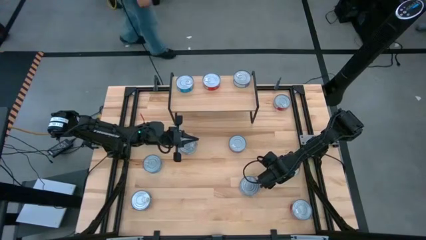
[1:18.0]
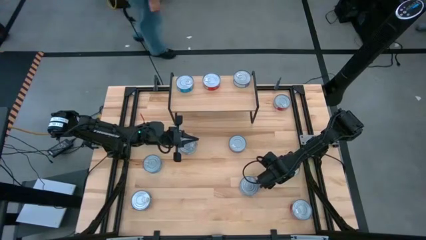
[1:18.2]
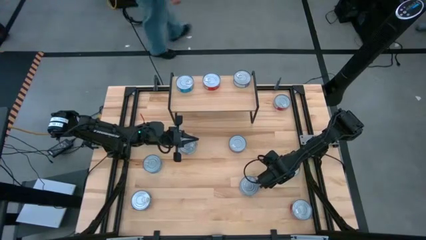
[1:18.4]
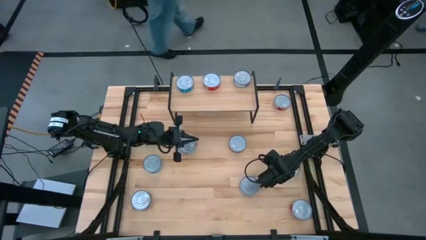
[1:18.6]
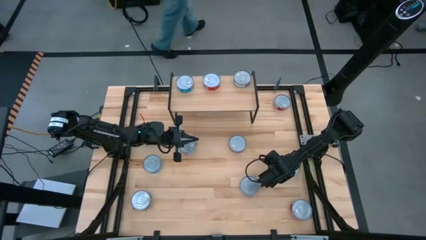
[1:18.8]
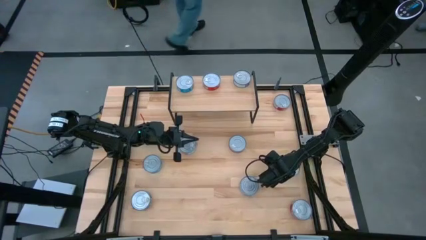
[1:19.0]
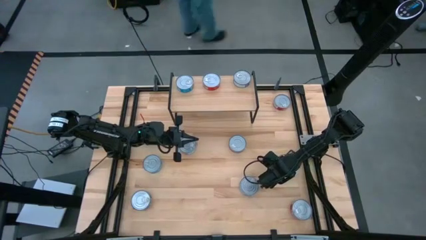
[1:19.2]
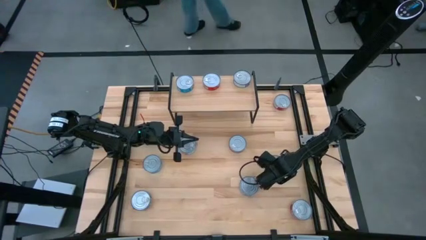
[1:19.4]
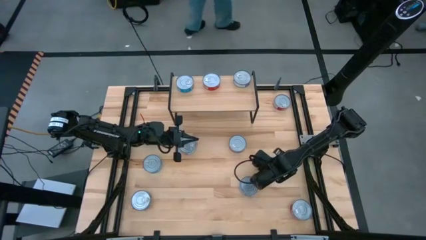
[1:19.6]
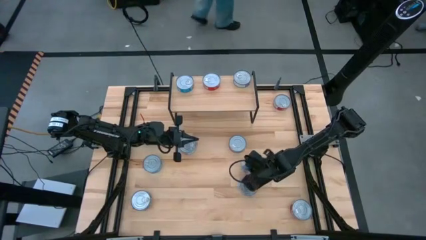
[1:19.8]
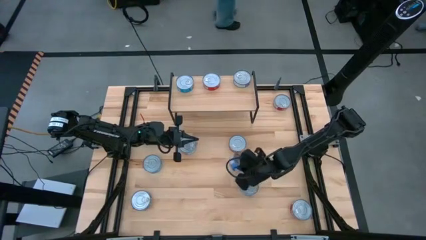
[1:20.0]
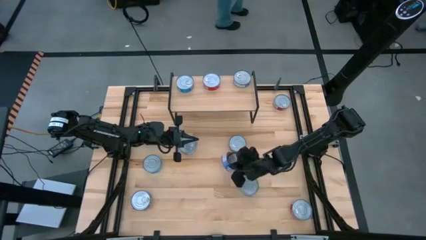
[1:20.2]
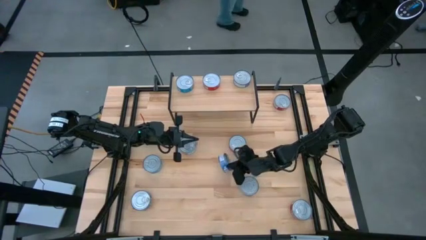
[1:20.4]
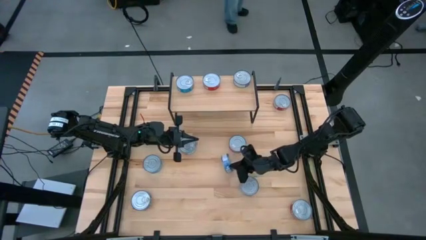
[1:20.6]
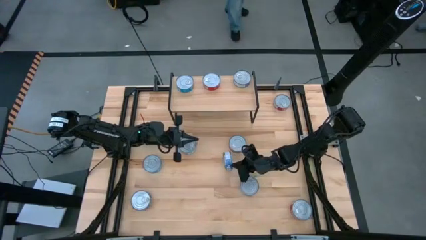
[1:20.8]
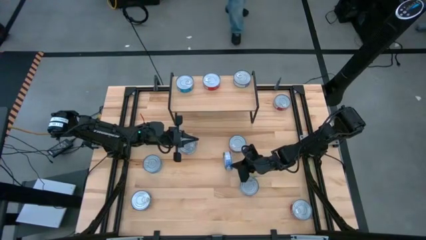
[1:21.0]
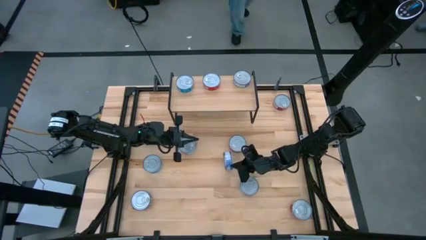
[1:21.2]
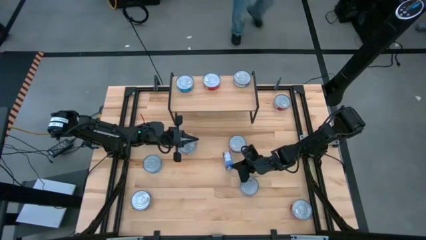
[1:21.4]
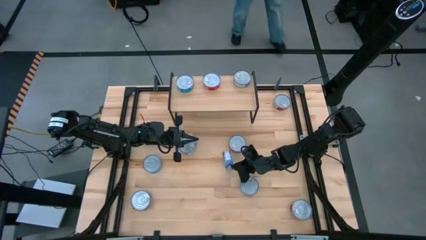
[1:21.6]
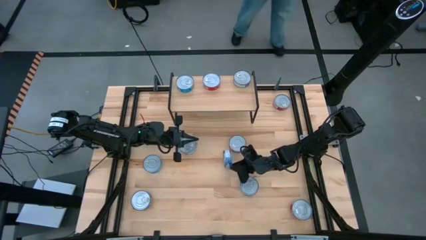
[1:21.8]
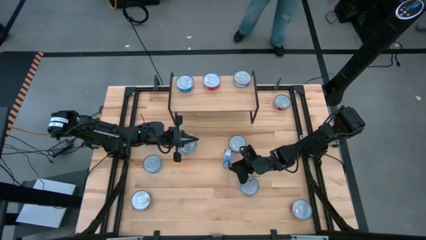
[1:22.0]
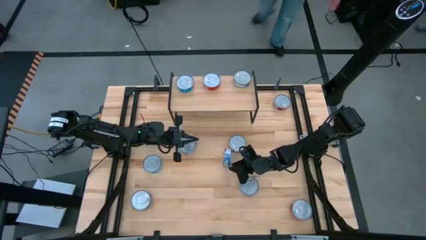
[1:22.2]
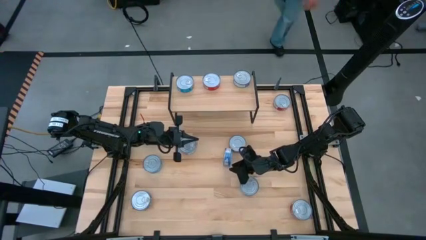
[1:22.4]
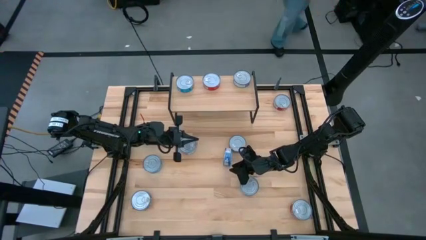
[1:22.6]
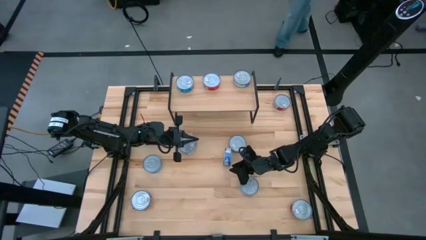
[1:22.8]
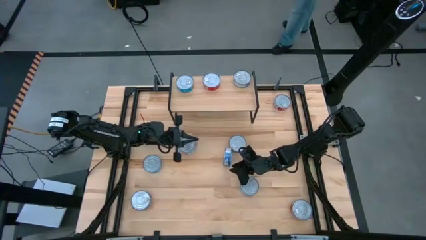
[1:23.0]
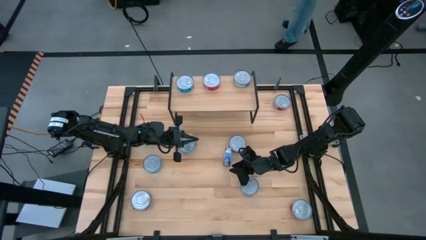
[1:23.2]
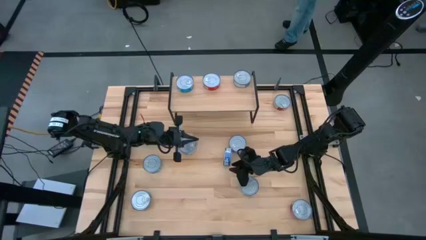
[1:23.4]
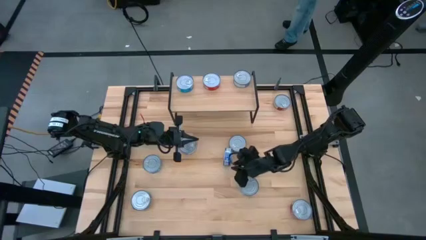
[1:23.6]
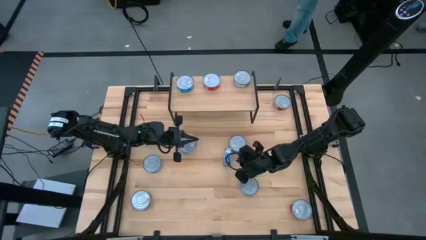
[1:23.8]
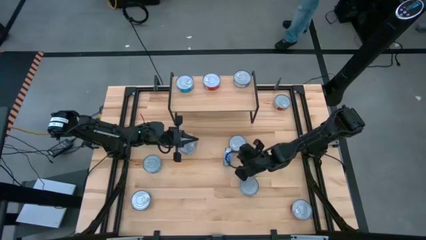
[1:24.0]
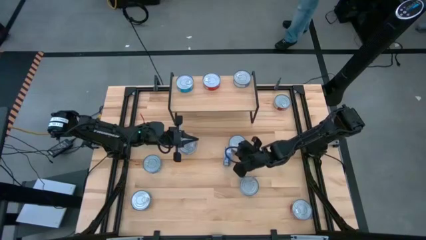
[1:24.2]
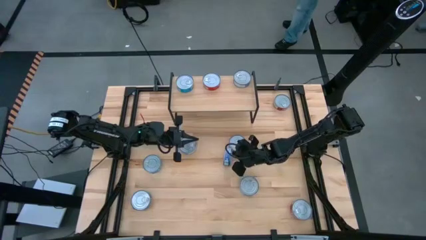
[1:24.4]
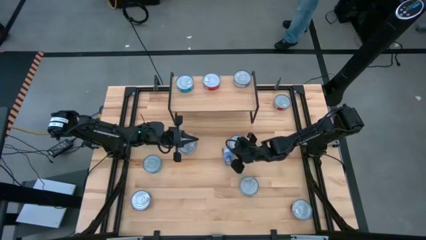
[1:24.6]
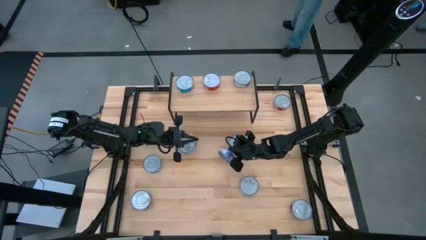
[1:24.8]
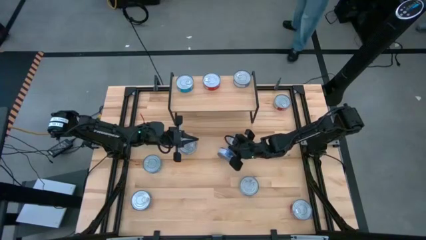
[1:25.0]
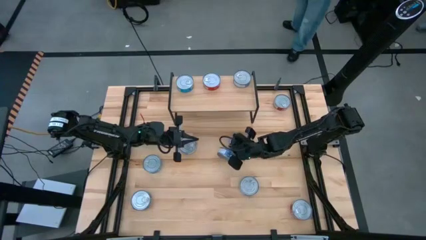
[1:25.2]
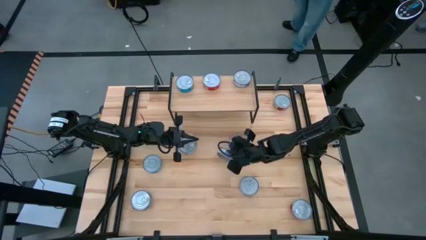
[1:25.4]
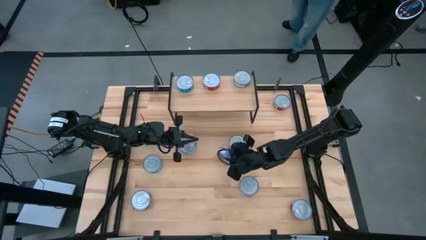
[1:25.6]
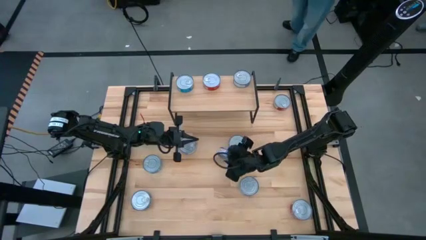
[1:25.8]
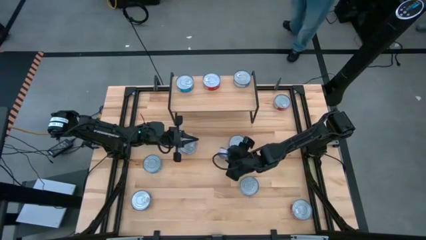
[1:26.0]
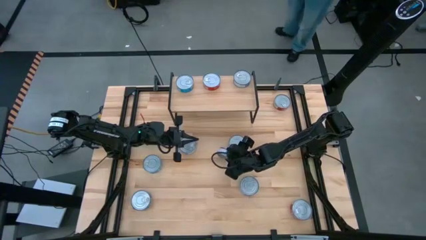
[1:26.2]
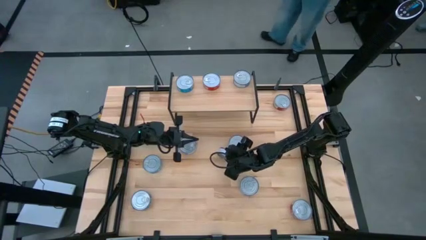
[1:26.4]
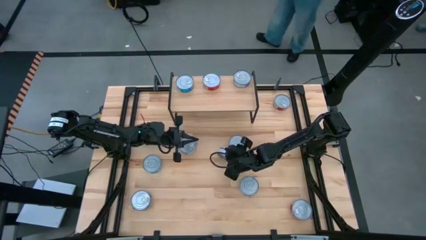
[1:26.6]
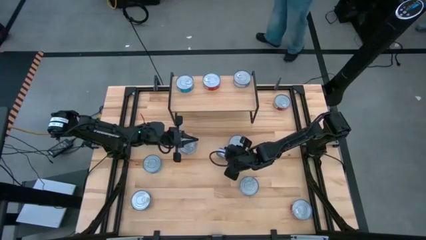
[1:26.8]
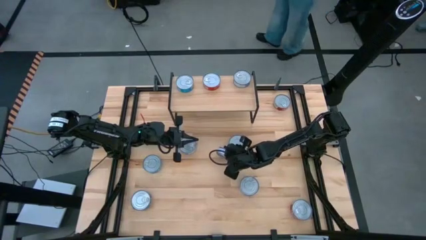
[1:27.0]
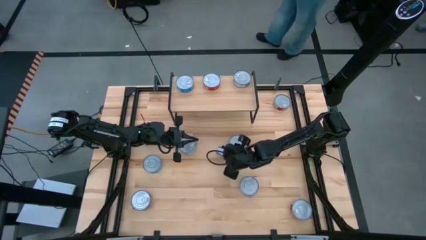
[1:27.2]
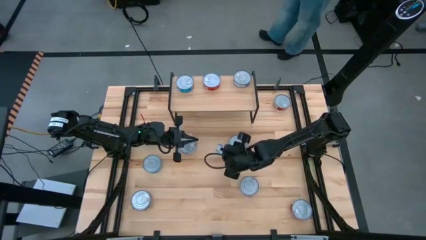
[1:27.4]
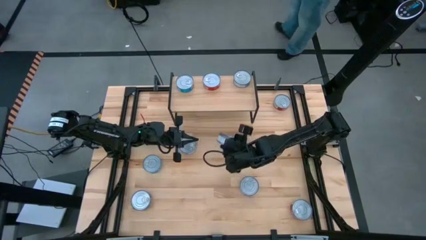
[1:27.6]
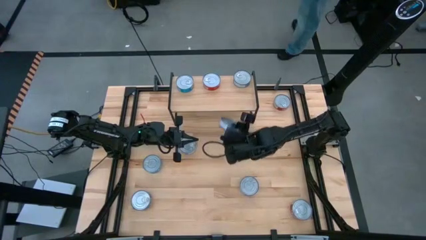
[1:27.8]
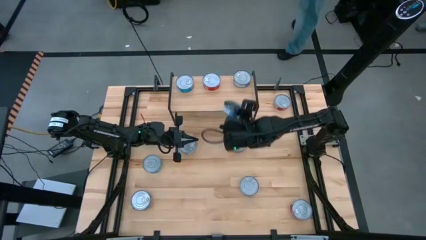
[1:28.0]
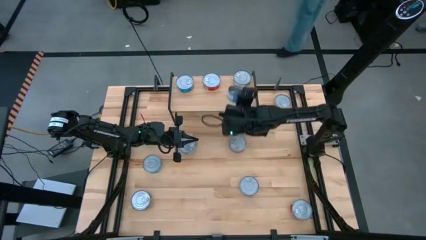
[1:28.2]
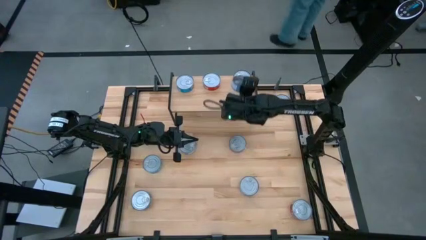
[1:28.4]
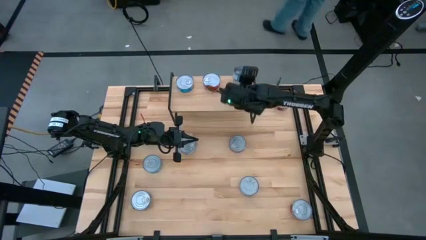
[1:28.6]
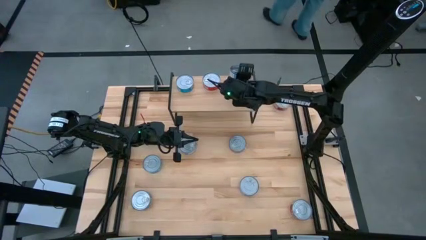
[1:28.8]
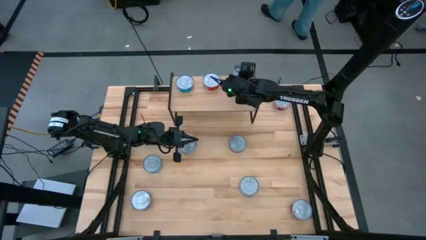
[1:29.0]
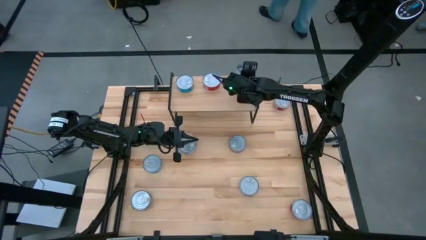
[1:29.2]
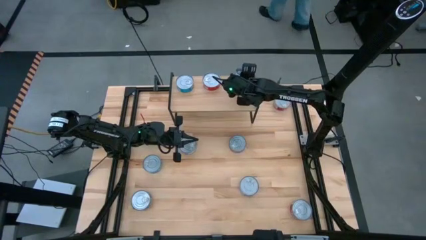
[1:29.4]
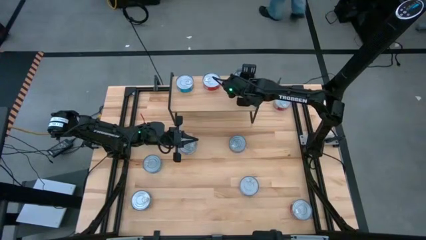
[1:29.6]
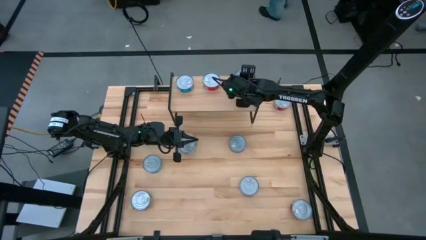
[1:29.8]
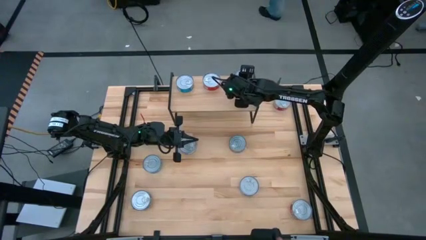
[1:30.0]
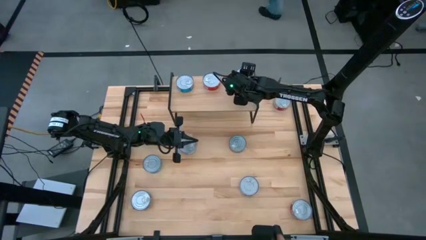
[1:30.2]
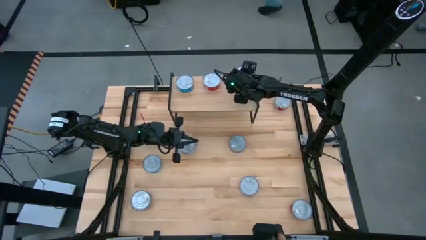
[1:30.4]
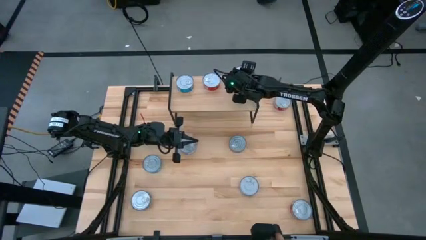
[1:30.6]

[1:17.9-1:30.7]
Task: Stack canned seafood by type on shelf
Stack the blue tuna can on top of the other blue tuna can on the shelf

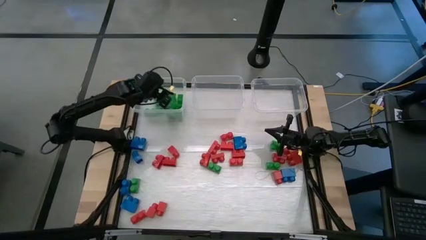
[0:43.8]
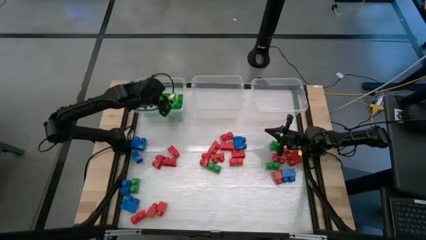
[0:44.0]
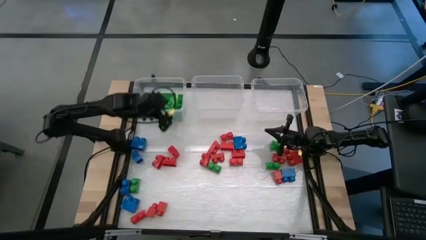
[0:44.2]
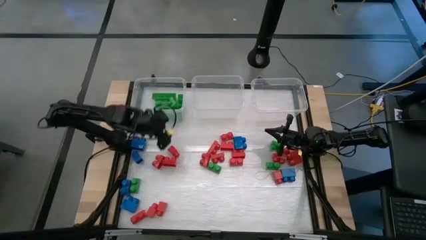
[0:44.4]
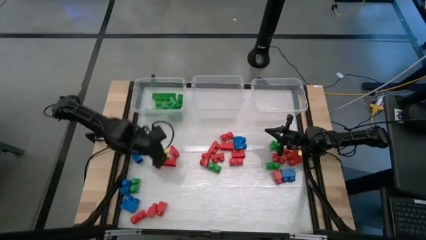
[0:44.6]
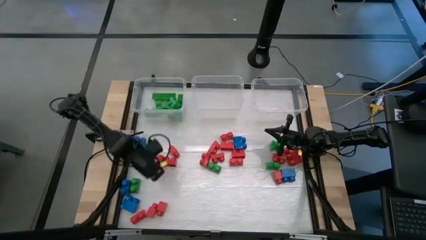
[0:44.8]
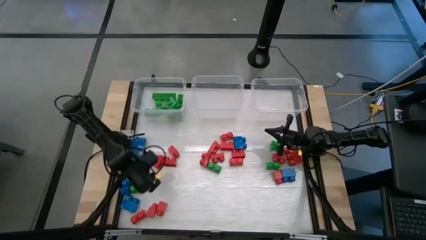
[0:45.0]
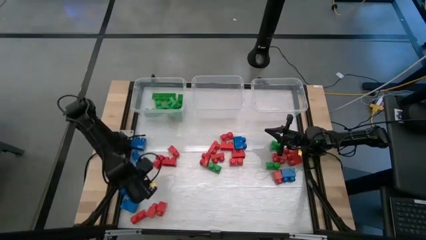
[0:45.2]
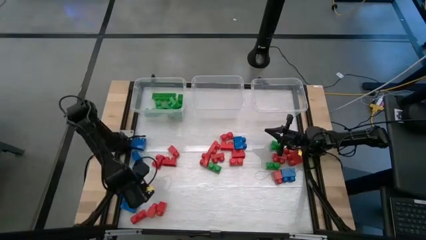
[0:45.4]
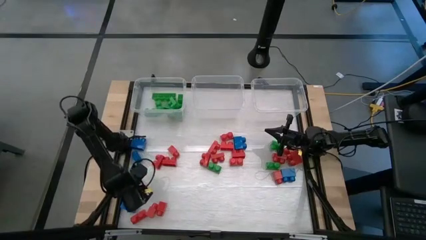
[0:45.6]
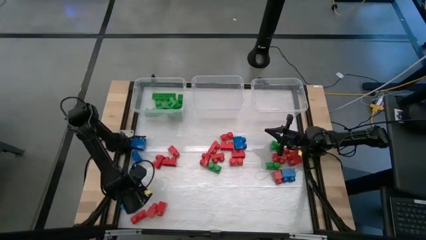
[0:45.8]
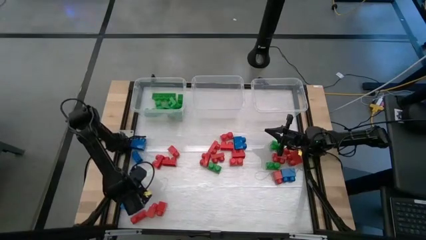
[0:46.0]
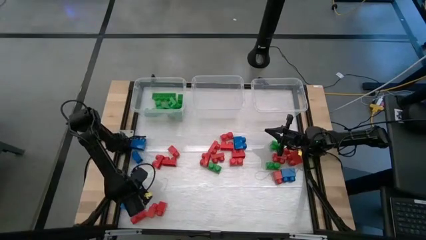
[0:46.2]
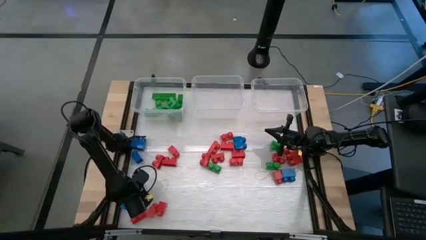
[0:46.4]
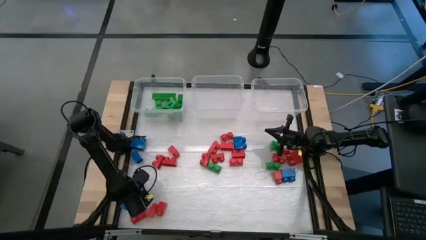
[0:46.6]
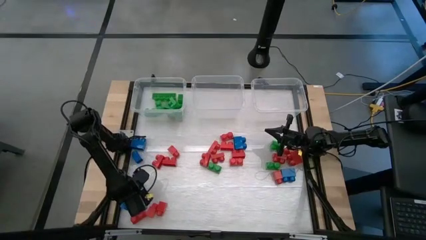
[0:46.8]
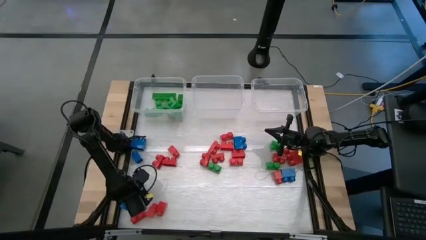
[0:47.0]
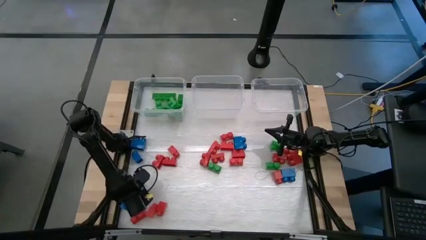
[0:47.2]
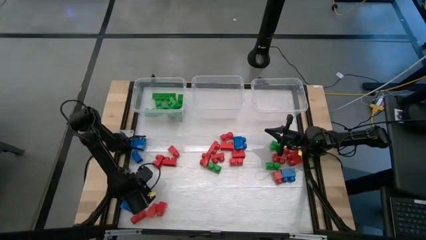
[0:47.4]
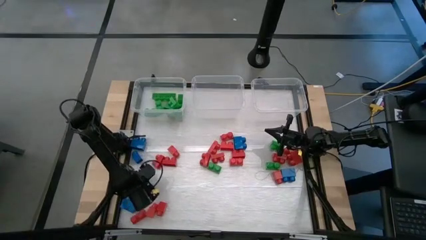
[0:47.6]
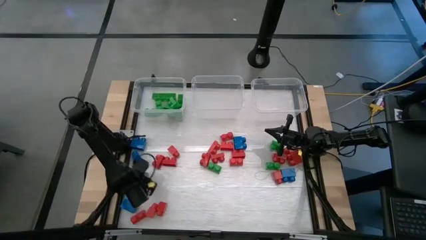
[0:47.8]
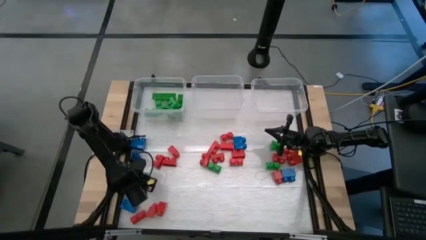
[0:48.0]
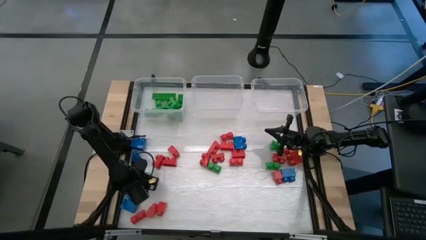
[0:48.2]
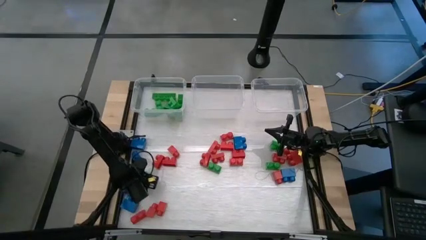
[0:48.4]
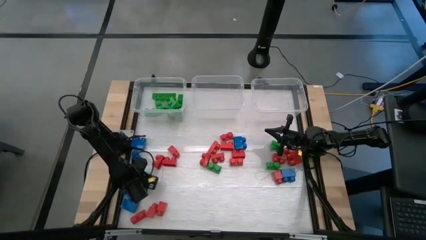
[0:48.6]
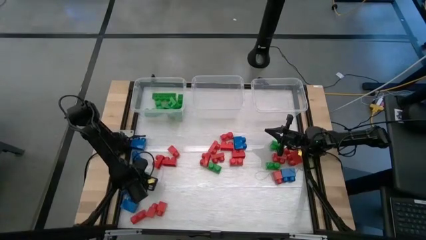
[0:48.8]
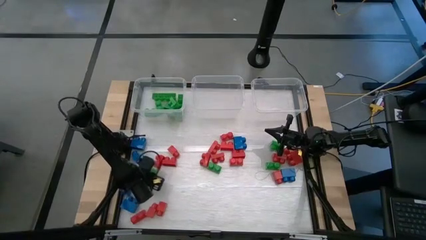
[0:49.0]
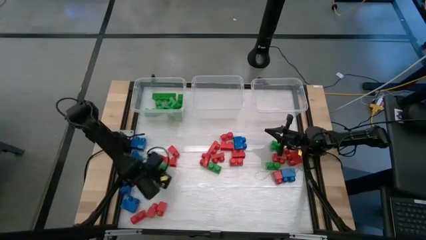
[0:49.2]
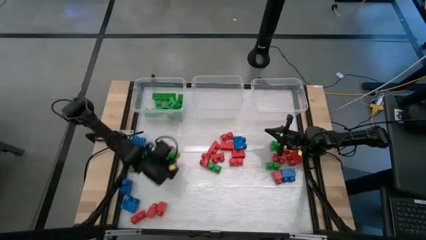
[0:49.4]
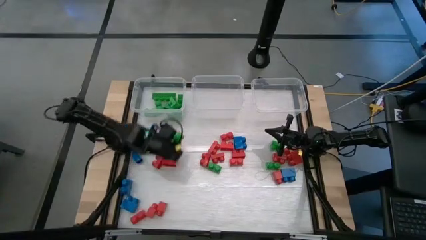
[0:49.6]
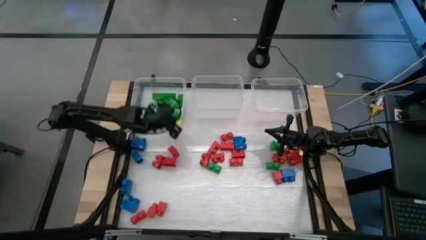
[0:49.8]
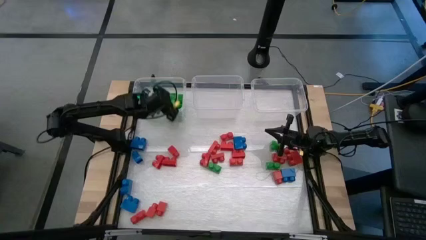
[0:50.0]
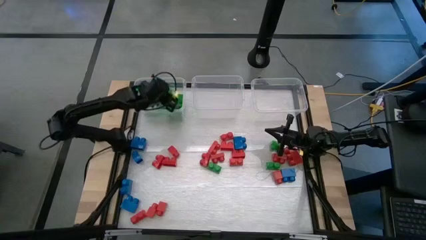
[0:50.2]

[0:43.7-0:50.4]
Task: Sort blocks
Put the green game piece into the left transparent bin
